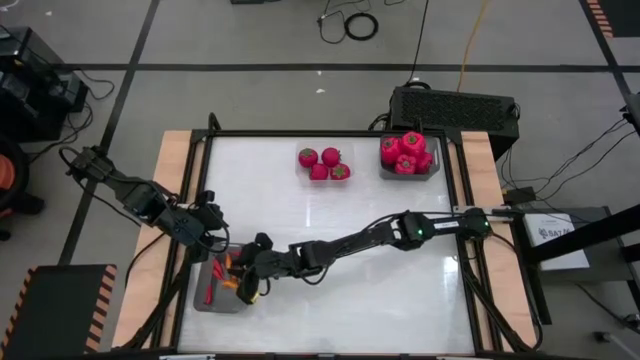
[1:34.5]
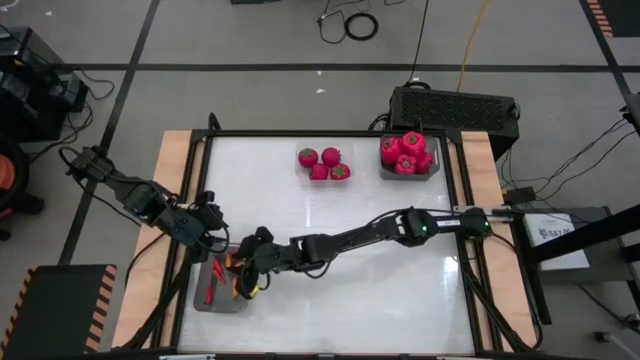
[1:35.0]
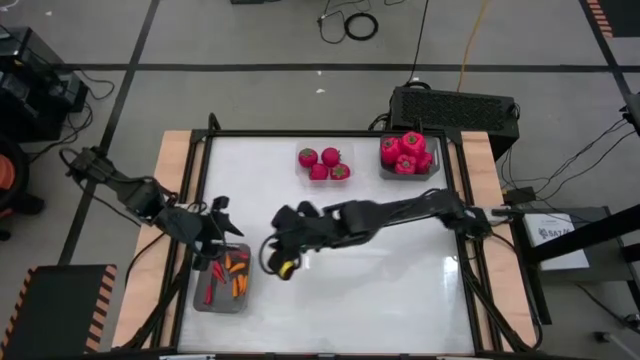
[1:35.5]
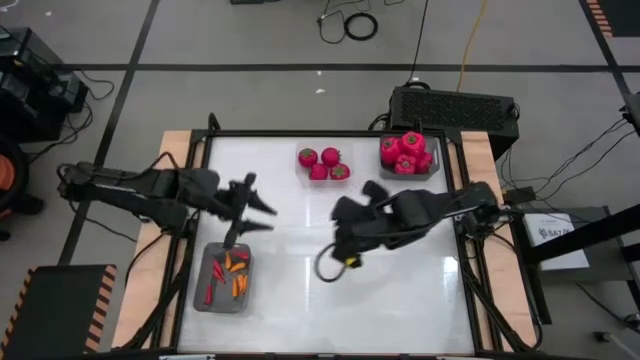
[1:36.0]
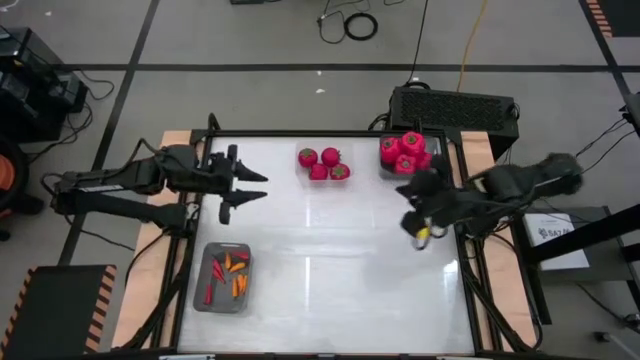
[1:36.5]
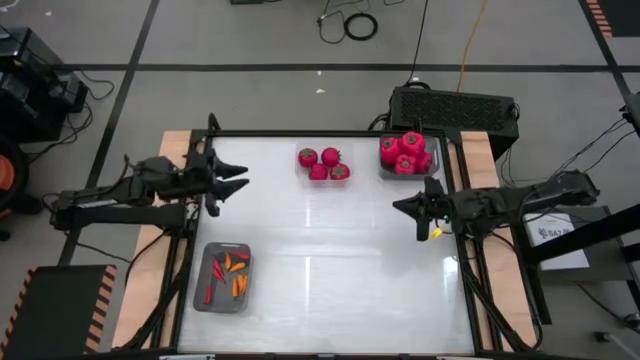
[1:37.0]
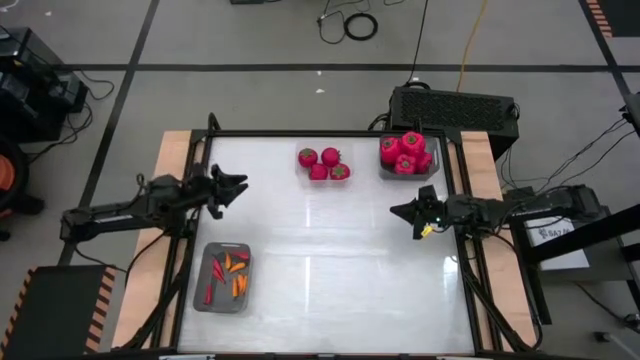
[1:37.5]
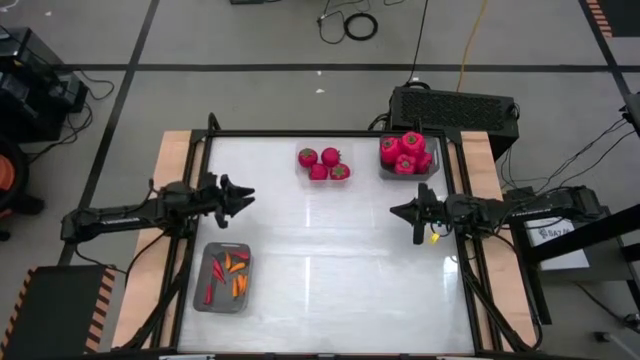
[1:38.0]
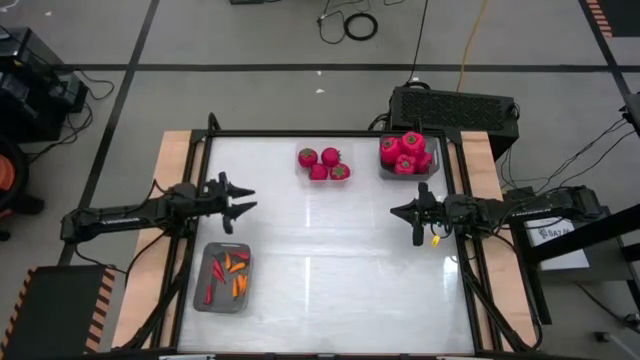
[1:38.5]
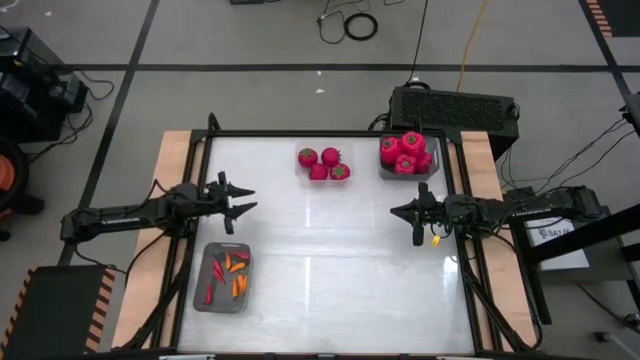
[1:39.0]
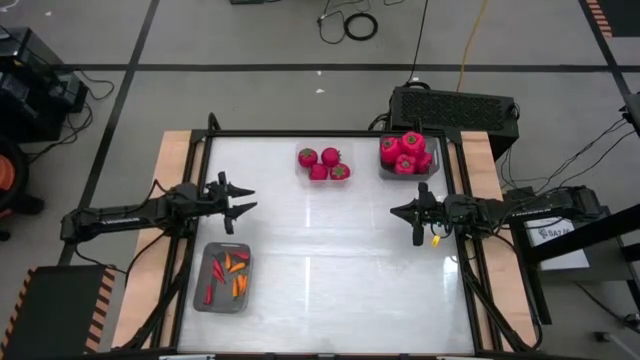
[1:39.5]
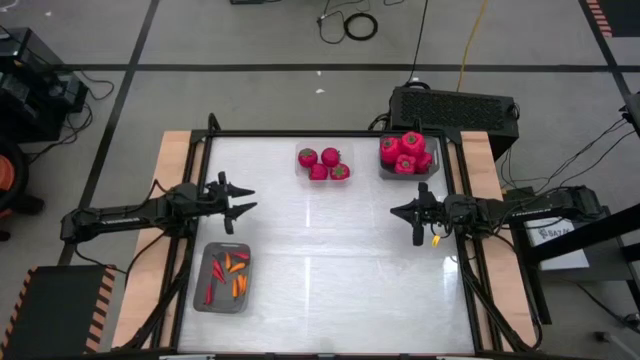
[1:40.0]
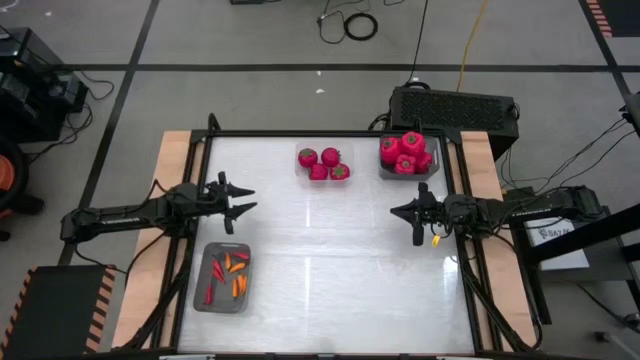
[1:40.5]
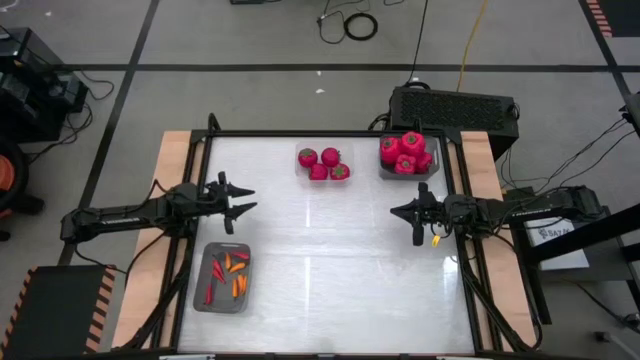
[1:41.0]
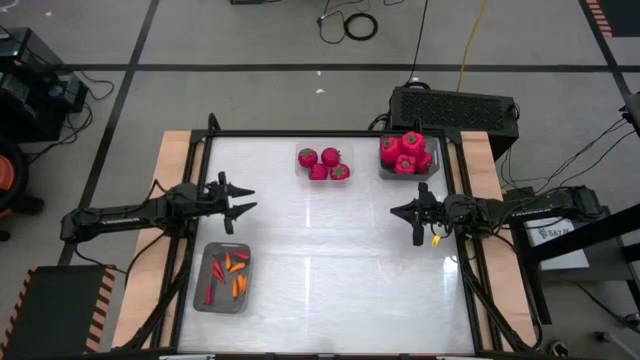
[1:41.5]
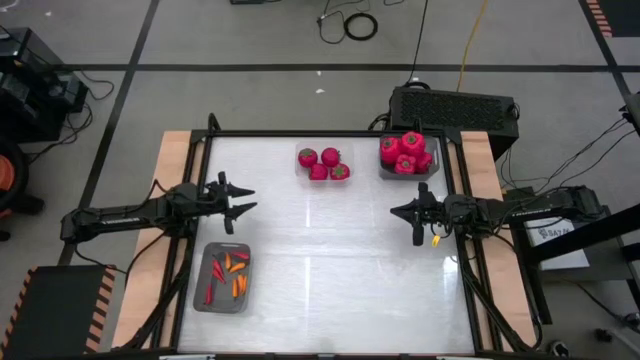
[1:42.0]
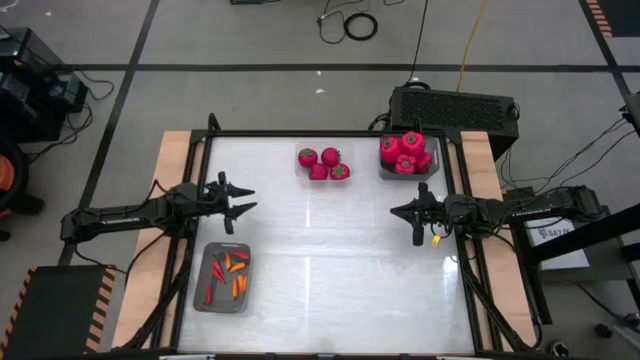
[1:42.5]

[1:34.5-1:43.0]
Task: Sort produce into baskets
Return to Home Position

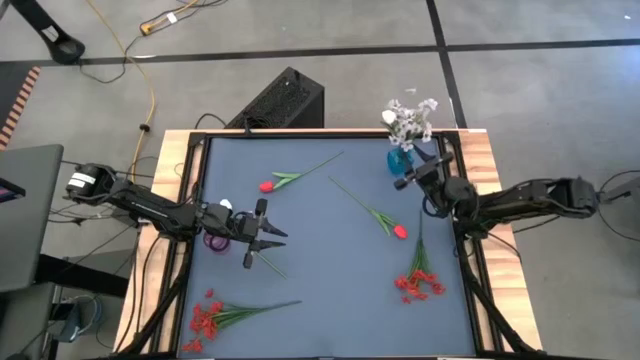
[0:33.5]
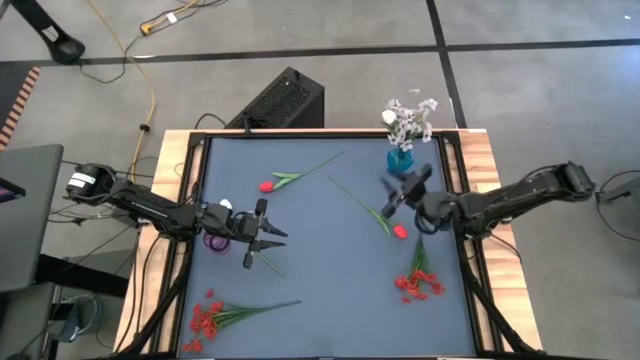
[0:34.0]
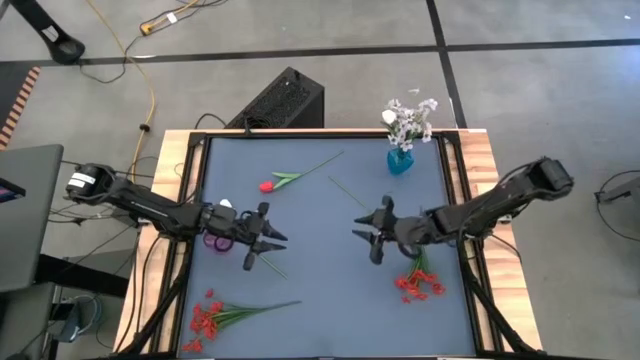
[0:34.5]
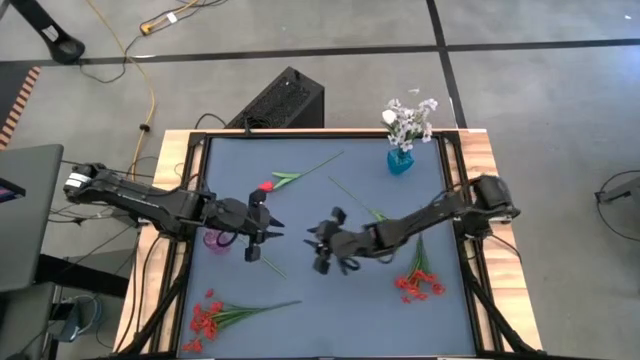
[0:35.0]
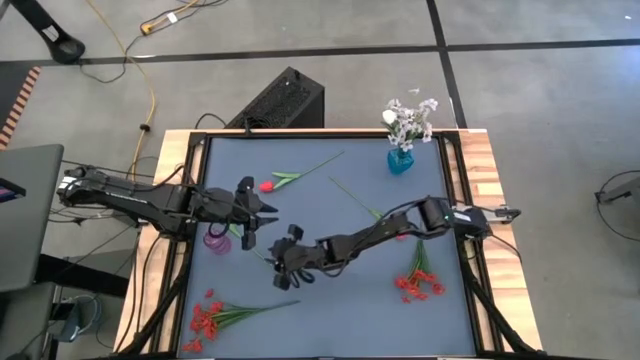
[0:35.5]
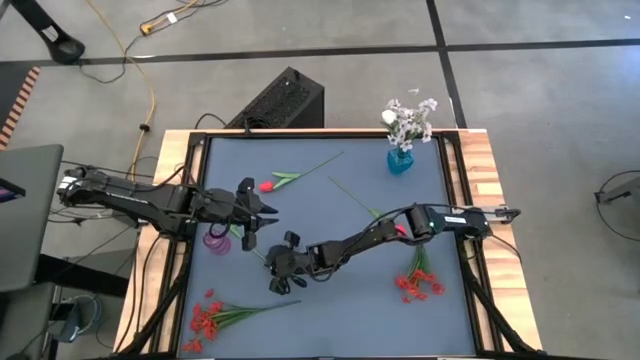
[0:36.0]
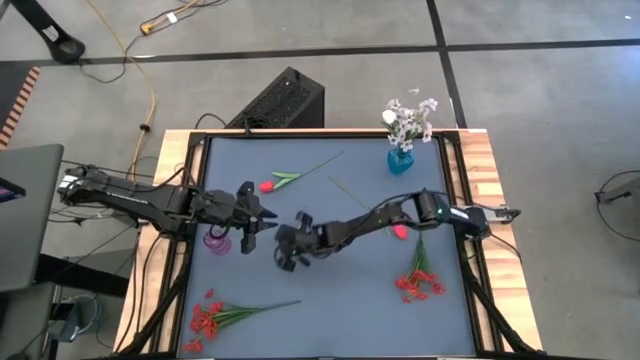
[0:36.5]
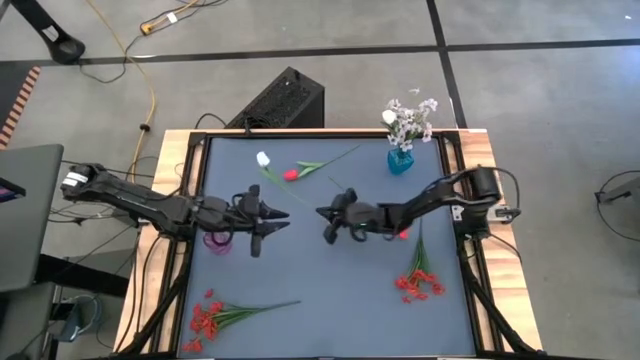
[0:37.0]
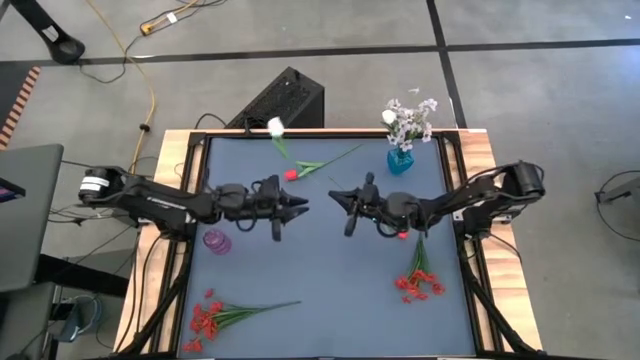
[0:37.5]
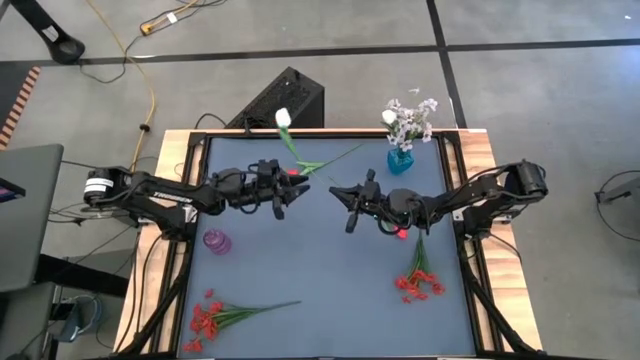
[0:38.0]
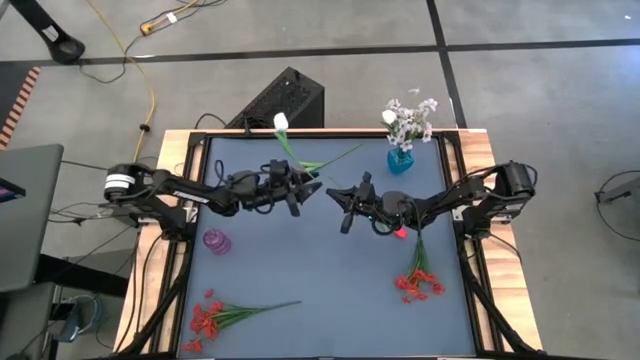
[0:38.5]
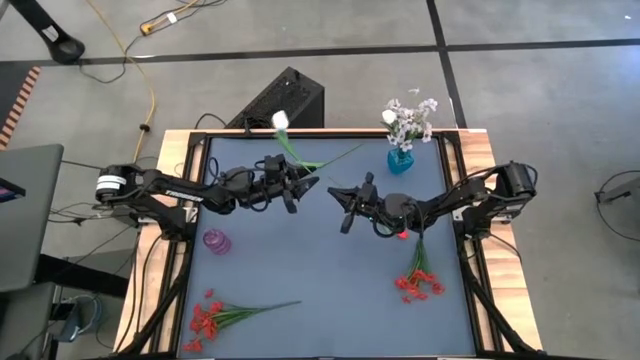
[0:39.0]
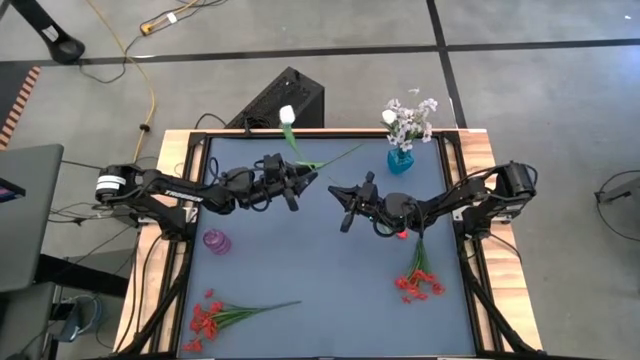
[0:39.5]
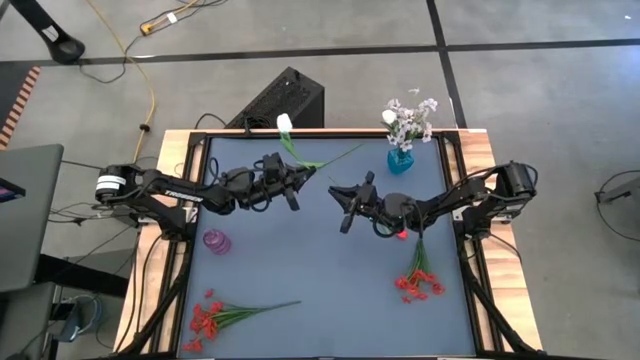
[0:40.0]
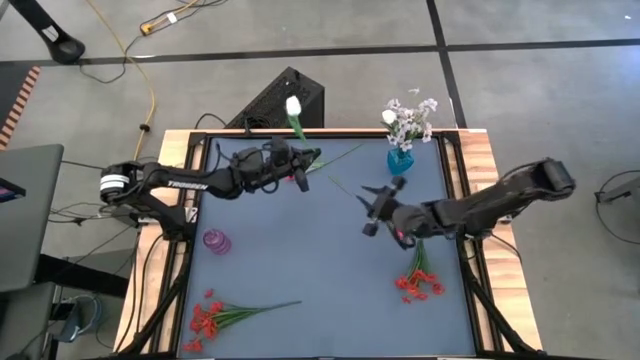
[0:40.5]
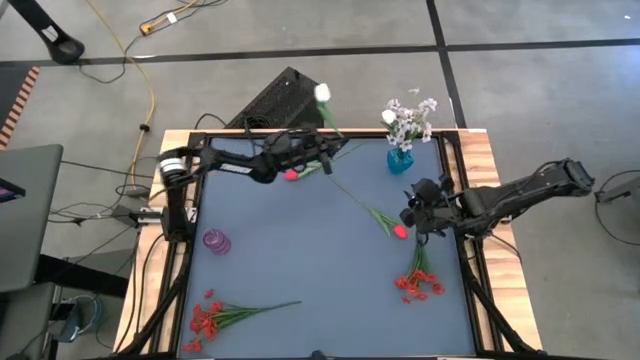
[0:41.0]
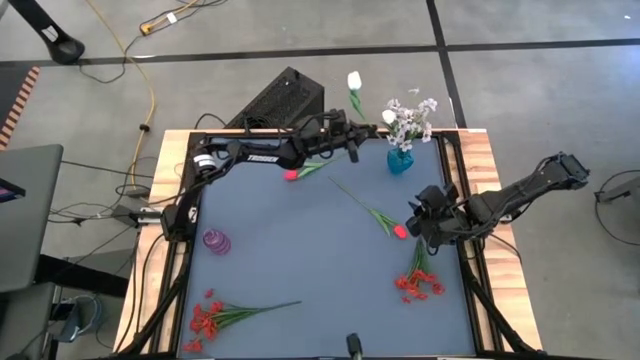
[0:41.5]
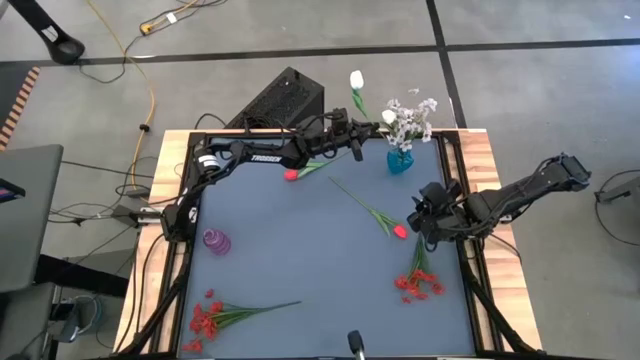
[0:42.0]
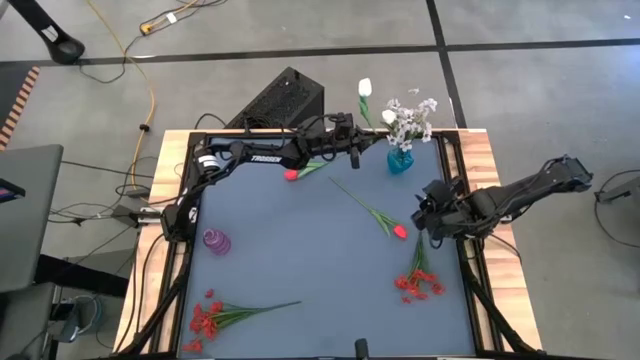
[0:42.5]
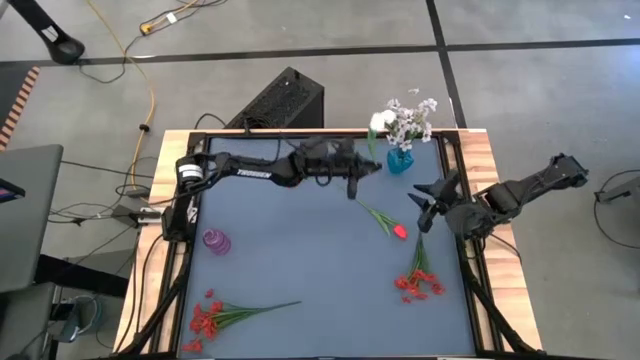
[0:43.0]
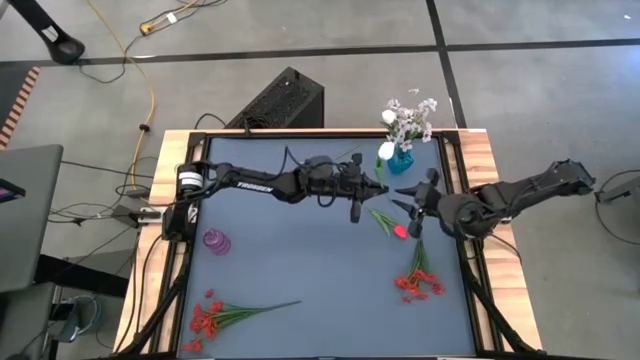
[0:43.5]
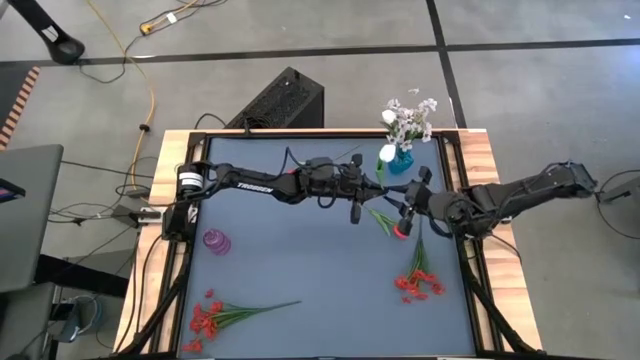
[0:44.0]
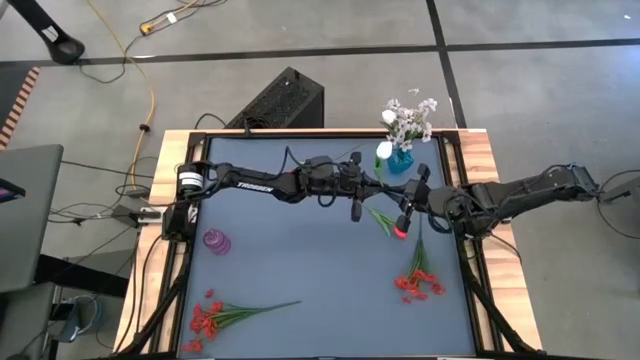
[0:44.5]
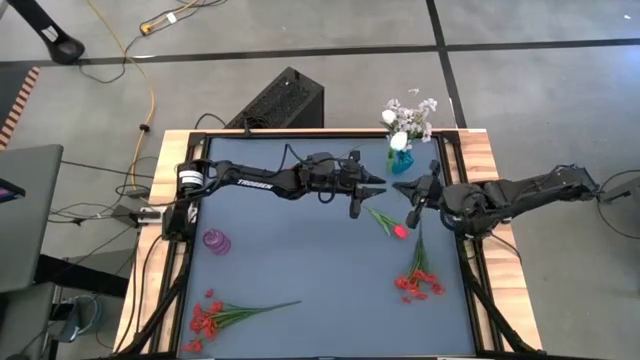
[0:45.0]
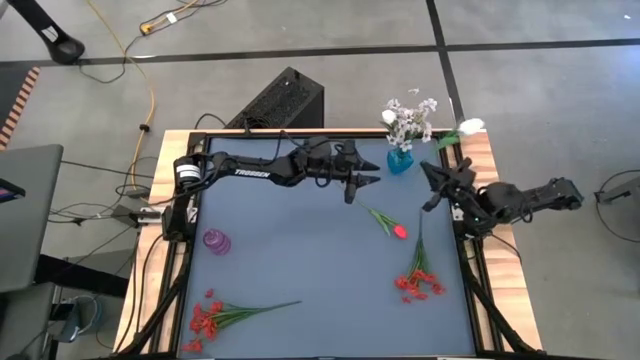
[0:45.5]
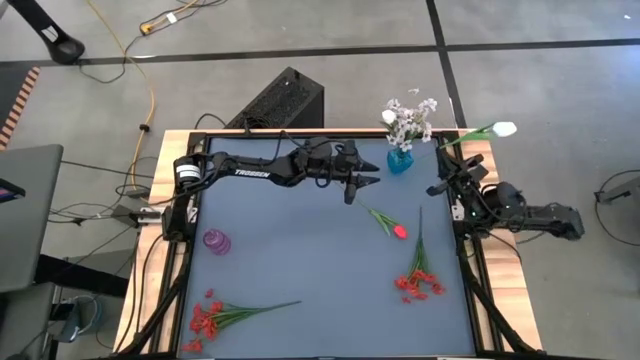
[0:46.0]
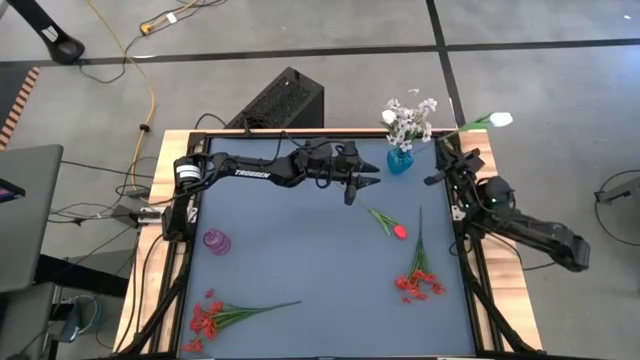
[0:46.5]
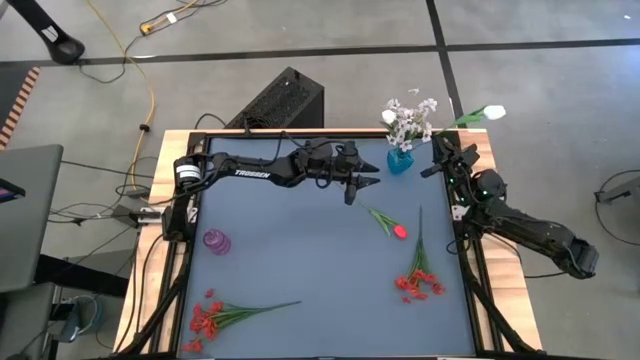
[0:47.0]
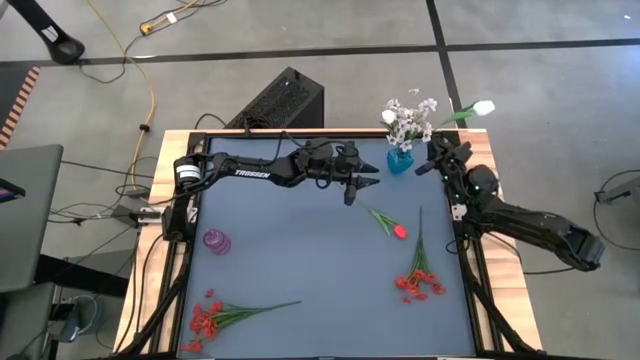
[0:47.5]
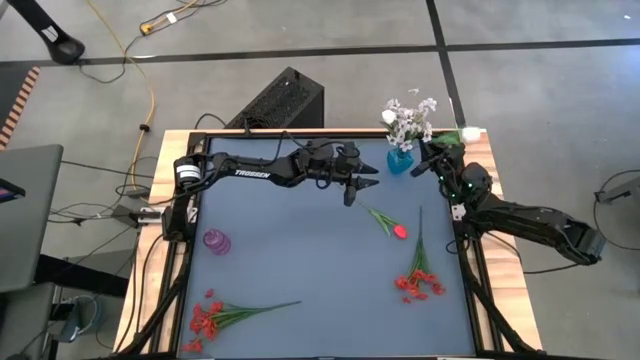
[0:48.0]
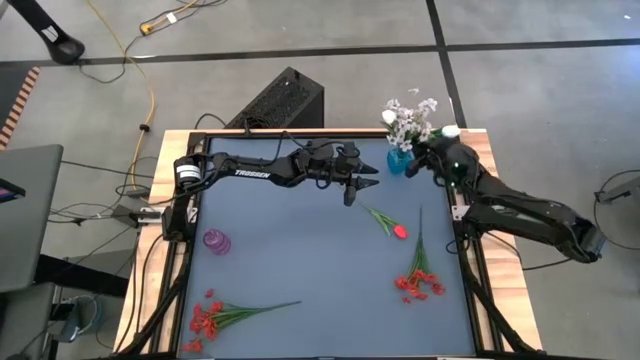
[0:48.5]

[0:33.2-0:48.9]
Task: Sort flowers into vase by color
Put the white flower into the blue vase
